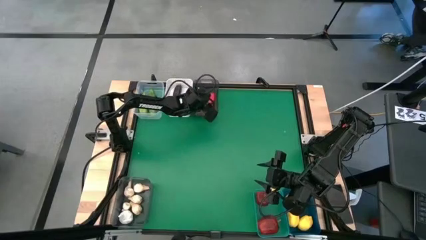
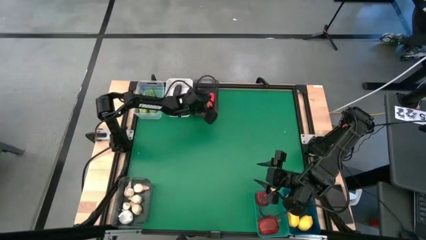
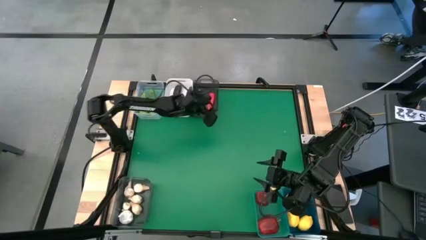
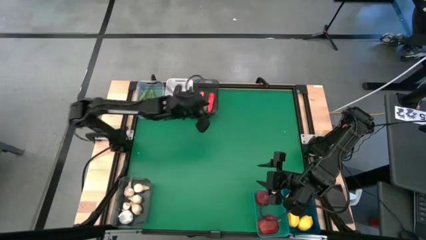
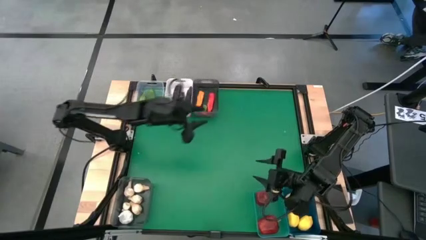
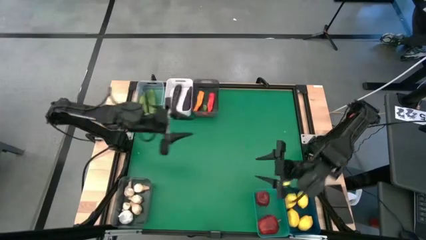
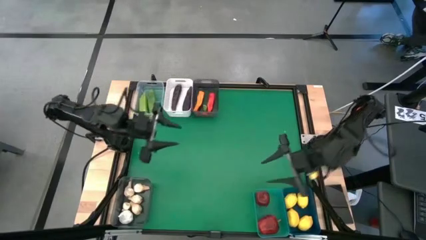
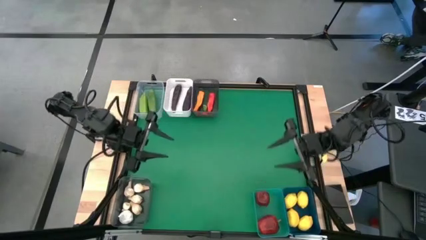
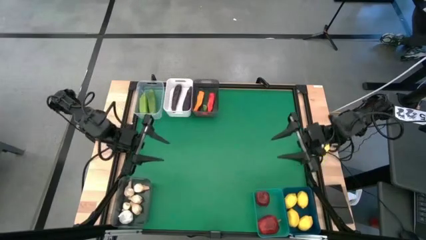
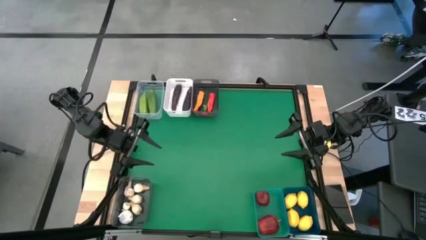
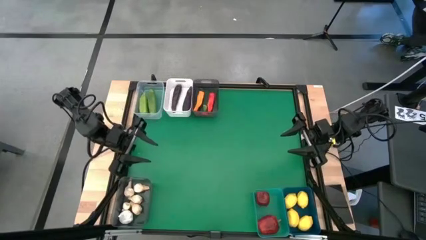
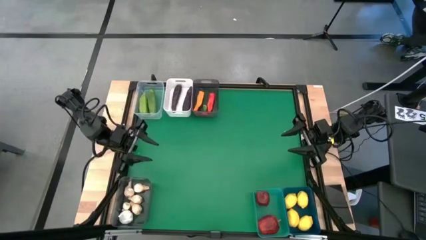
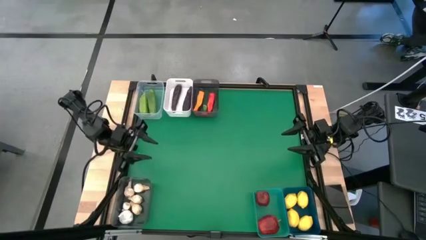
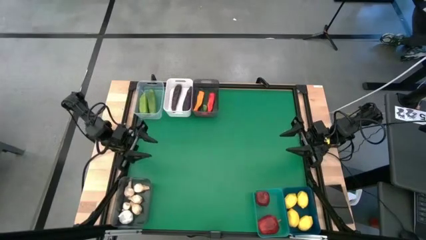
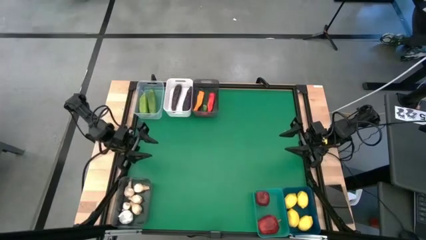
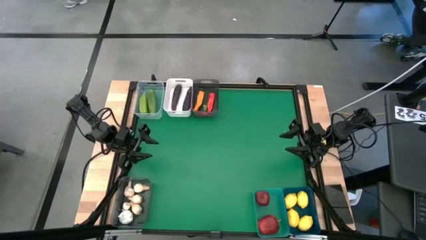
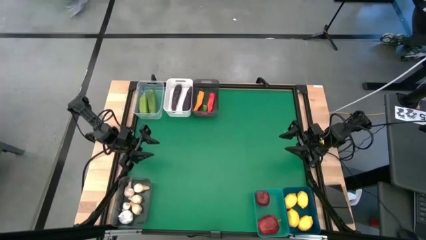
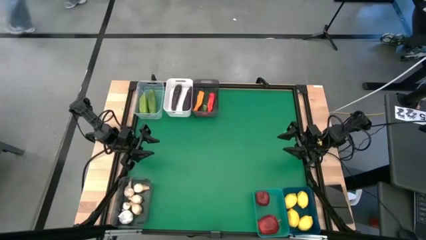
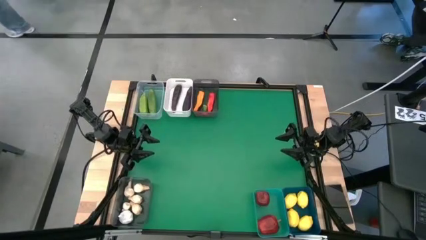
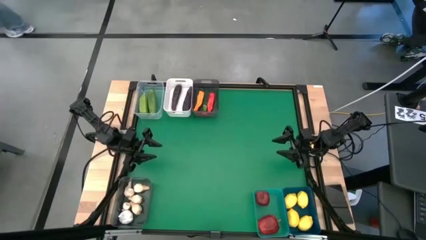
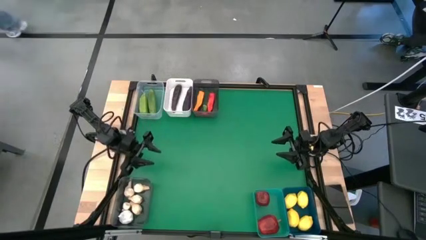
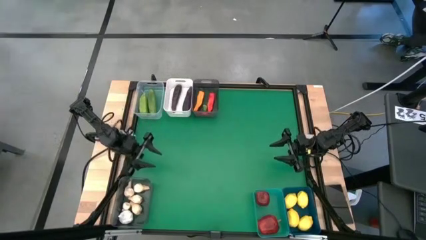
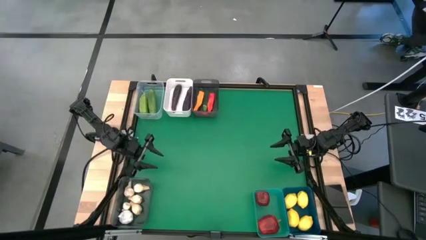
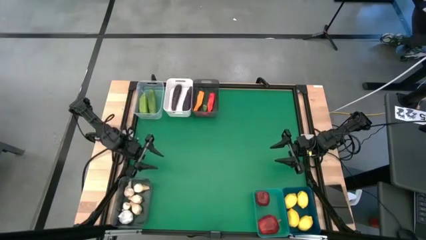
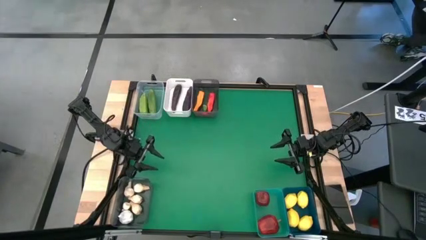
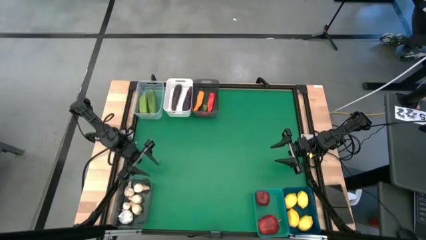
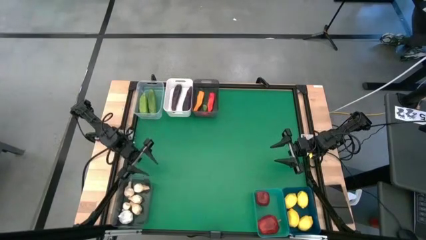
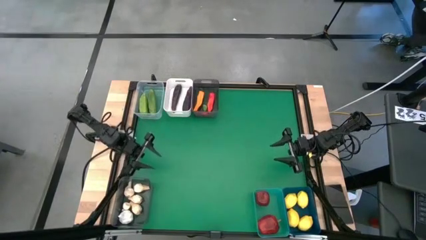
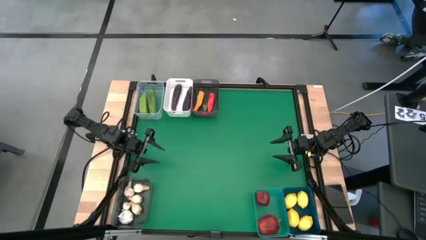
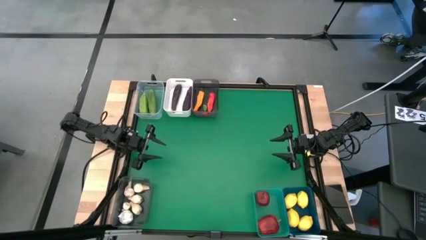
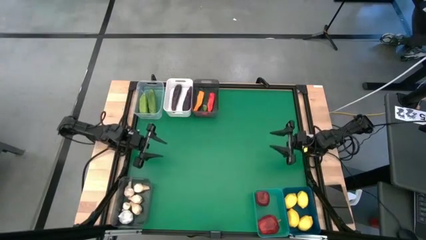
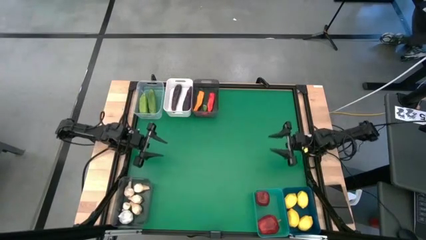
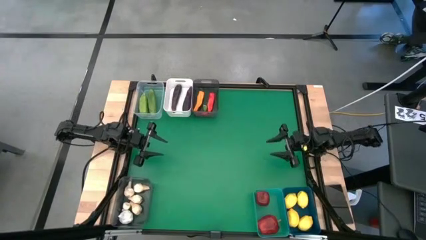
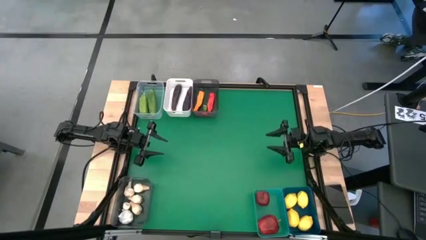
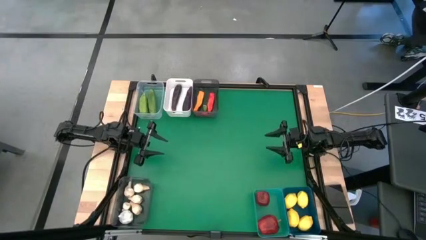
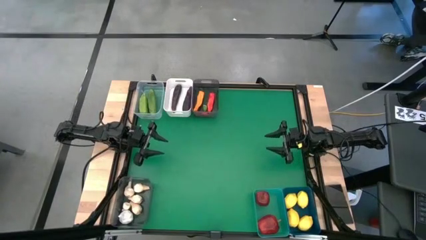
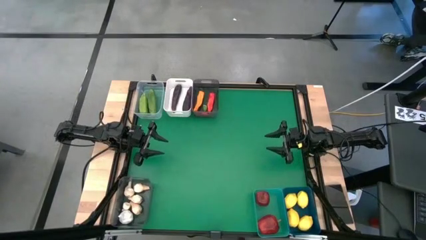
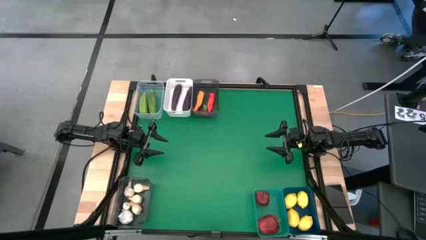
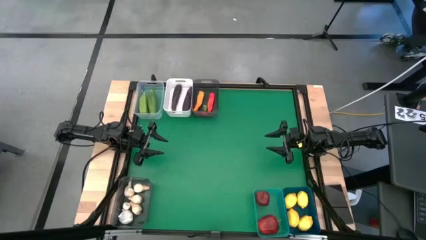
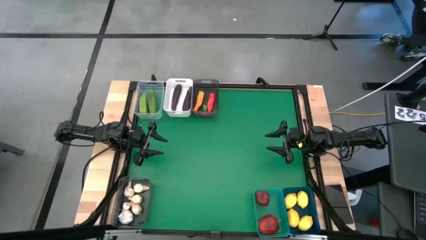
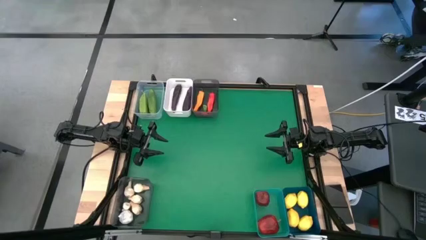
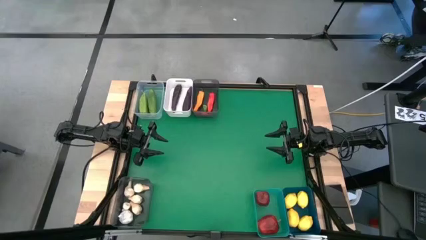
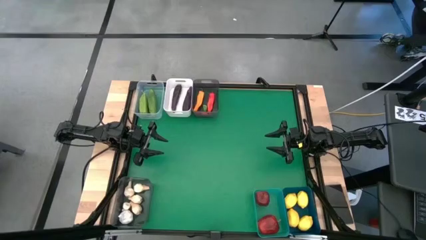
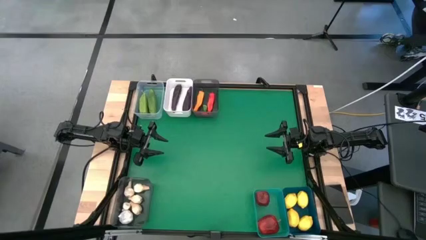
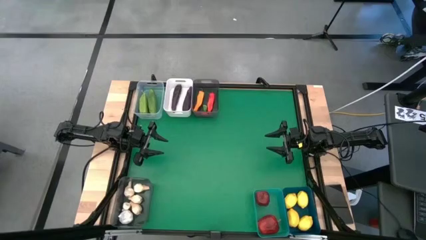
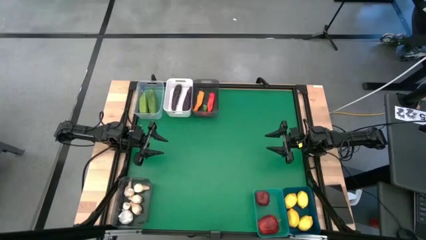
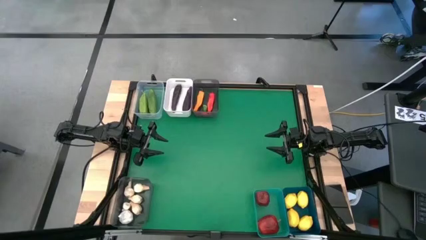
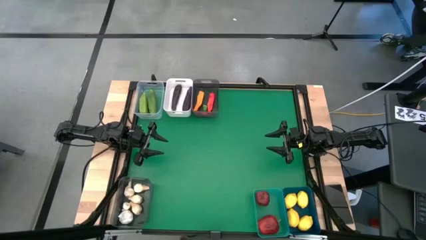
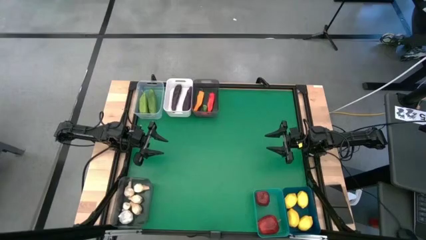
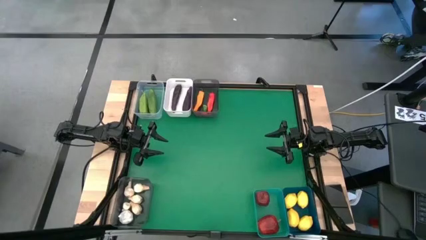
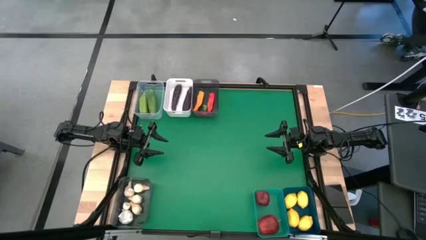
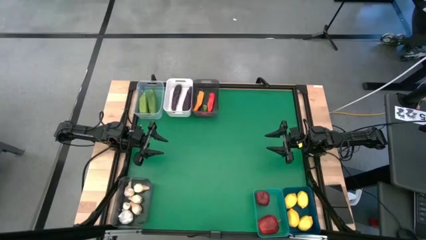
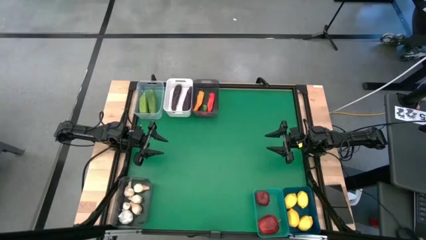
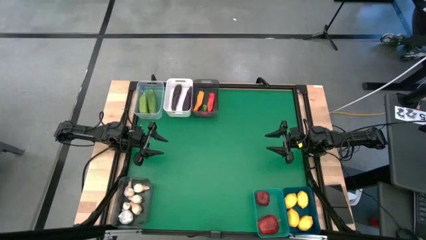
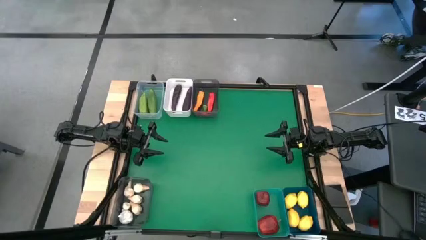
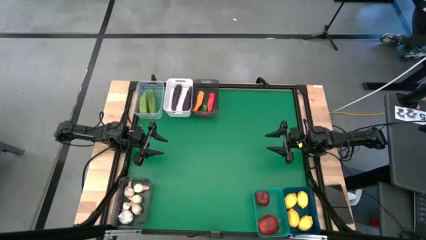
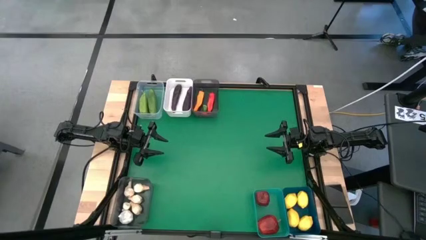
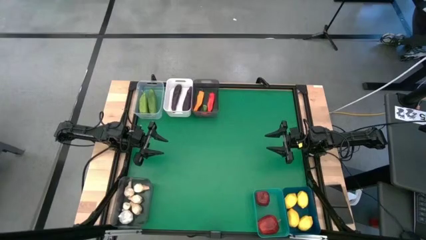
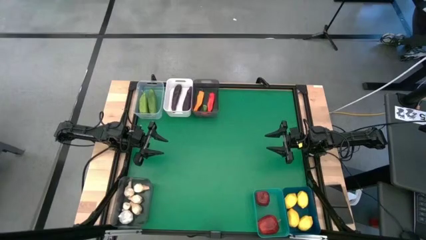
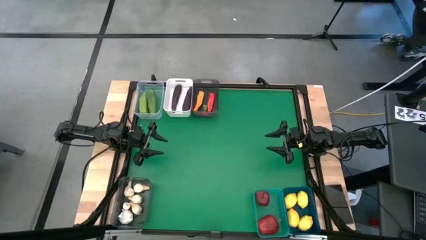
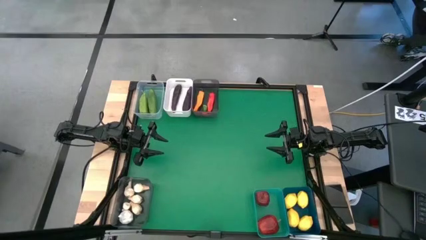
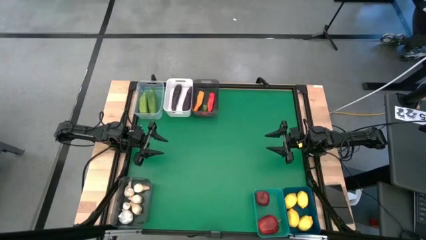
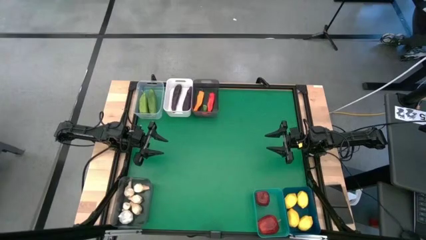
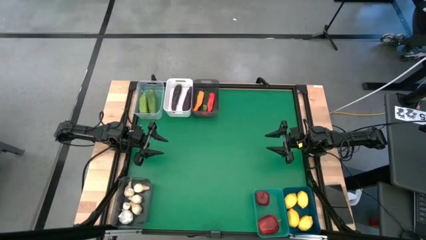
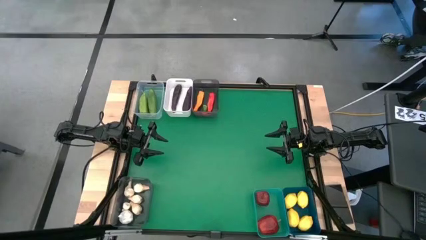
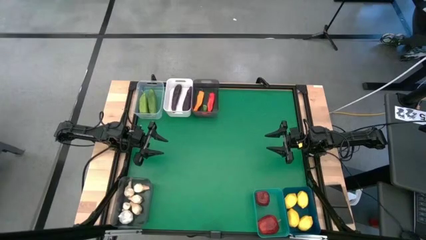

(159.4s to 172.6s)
Task: Sort produce into baskets
Return to Home Position
